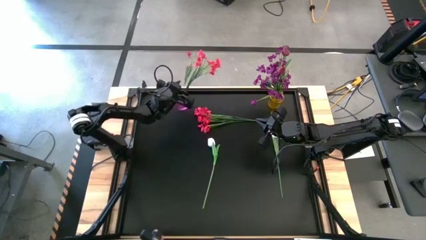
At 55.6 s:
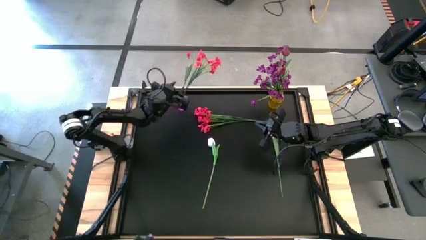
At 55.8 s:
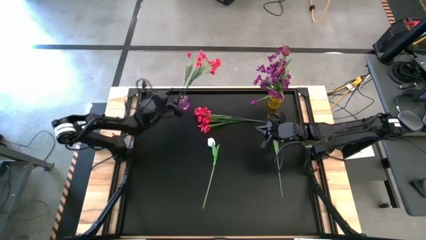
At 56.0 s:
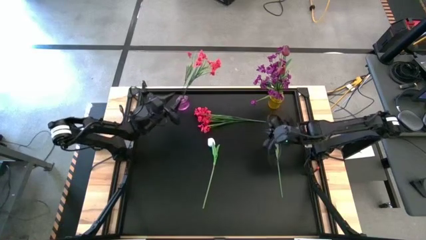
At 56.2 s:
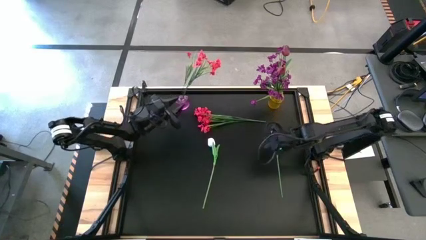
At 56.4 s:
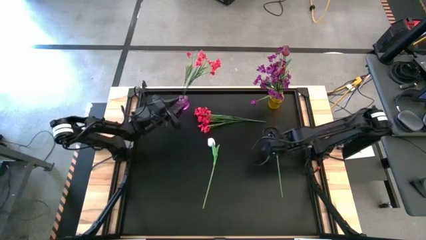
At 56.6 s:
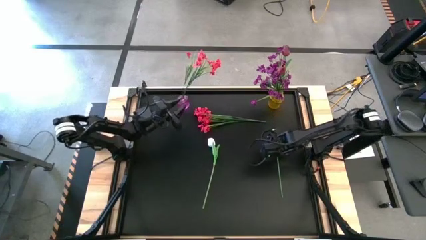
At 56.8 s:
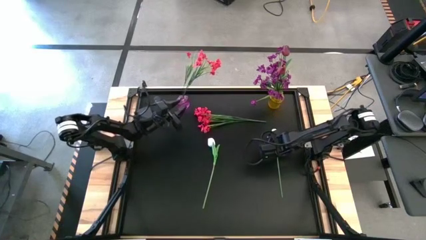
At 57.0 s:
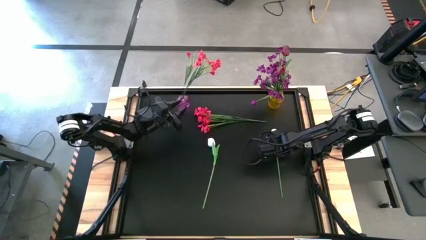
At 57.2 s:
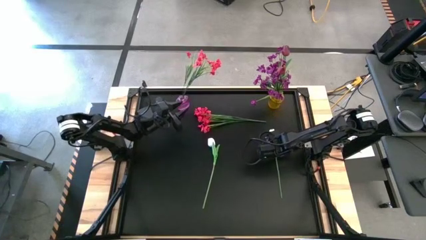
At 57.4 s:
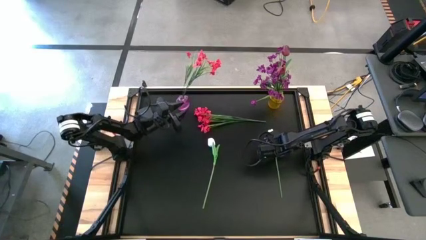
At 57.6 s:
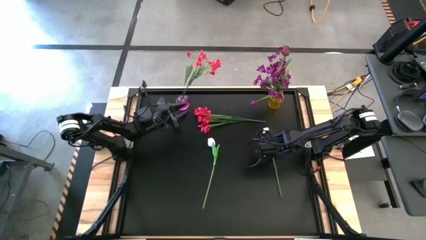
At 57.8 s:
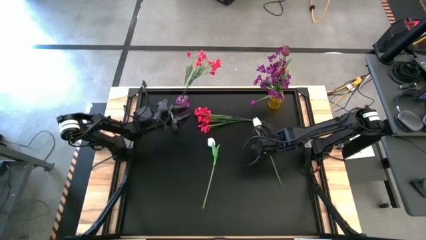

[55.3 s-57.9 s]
Task: Sort flowers into vase by color
Put the right white tulip into the purple vase

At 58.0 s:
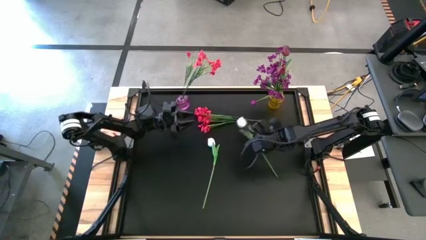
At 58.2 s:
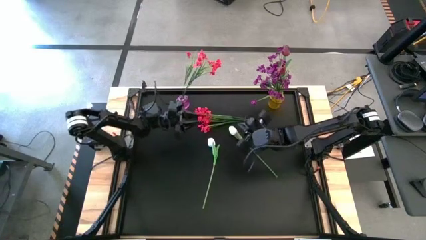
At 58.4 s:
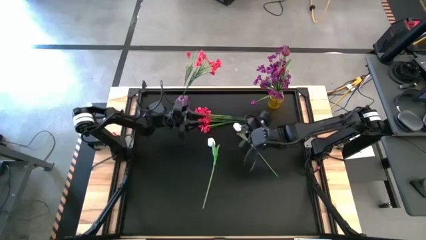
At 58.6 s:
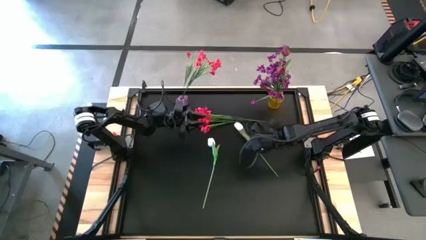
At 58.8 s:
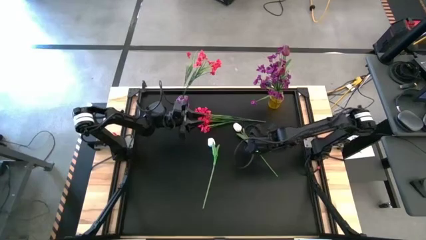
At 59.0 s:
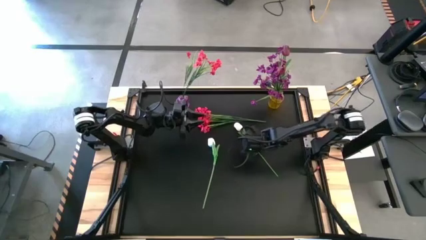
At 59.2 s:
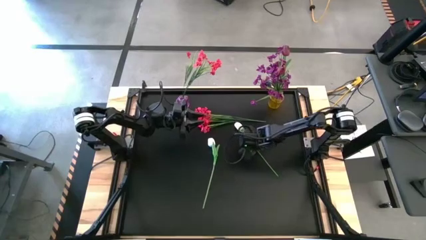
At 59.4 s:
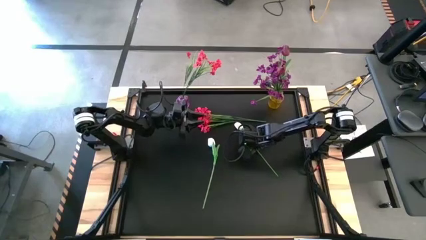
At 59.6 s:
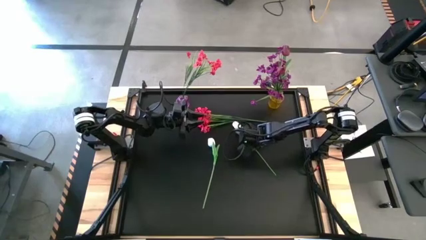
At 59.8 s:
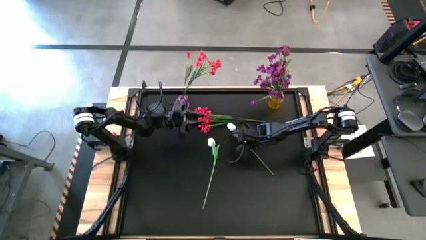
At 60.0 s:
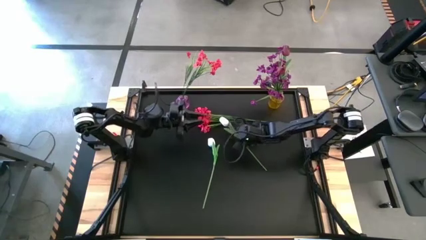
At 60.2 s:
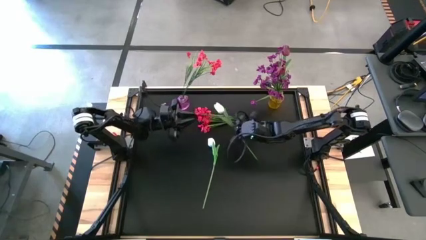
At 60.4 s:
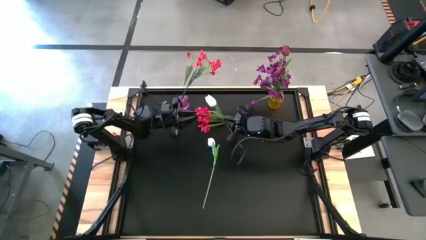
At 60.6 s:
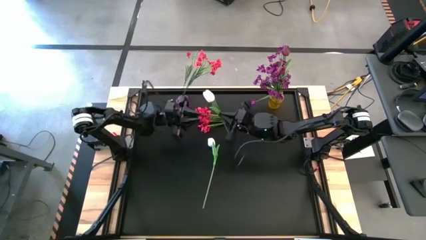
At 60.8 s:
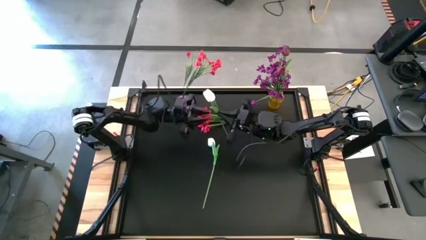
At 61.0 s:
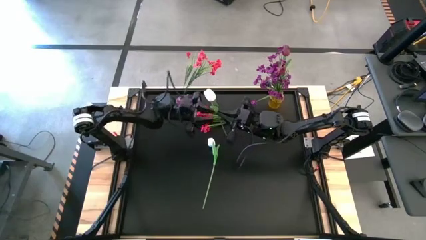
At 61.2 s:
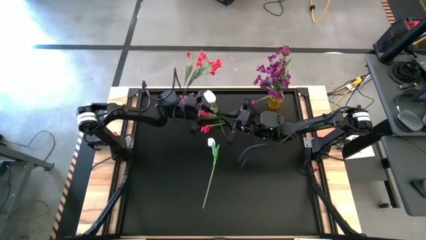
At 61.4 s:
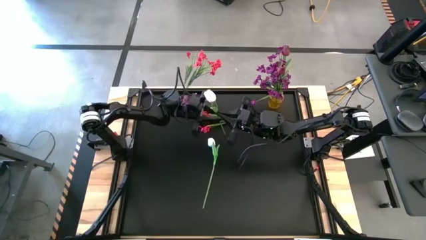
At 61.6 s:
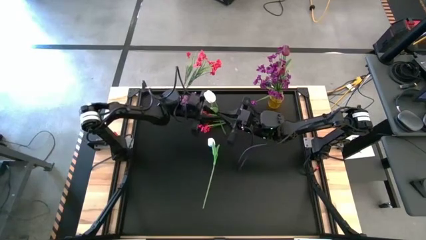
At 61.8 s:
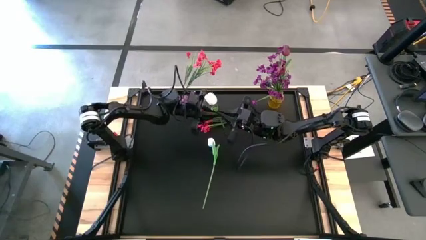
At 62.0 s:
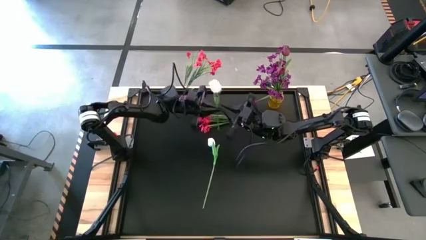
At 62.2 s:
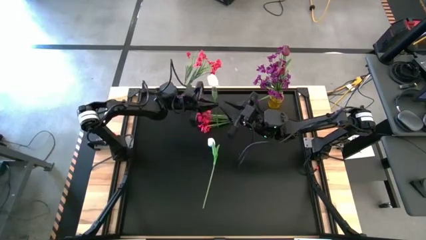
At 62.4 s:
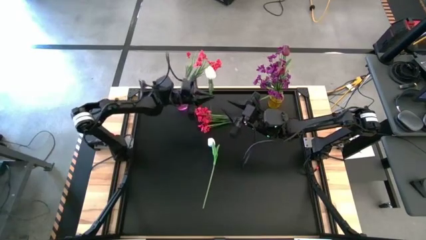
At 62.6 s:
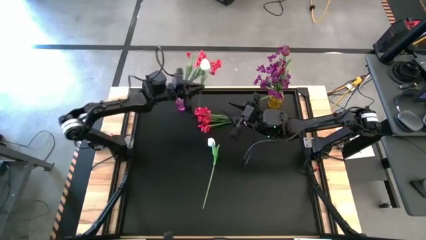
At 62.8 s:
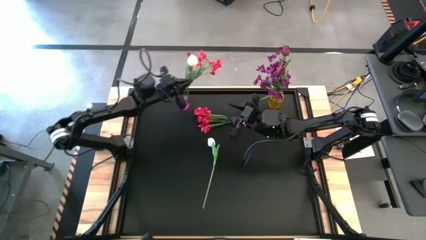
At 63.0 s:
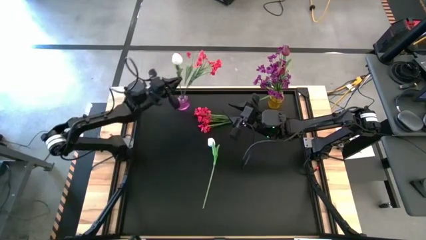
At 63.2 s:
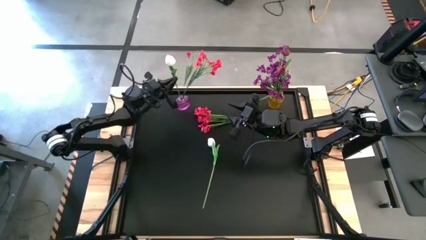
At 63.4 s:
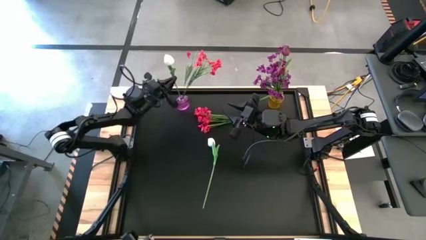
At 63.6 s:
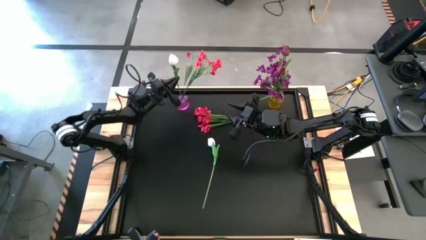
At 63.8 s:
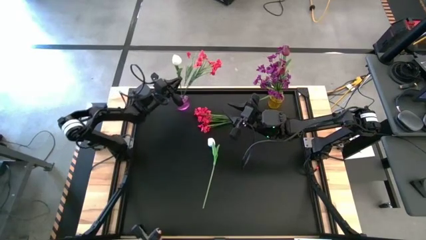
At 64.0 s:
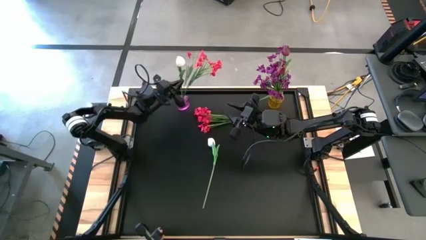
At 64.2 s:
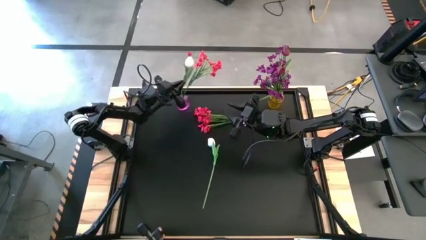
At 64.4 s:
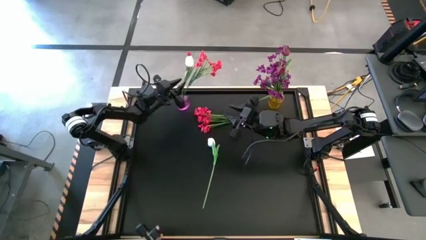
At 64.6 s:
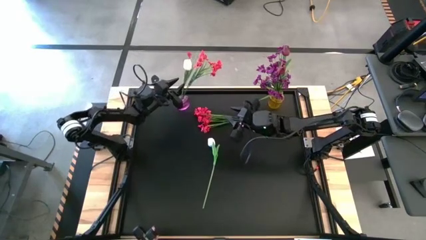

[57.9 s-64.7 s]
Put the right white tulip into the purple vase

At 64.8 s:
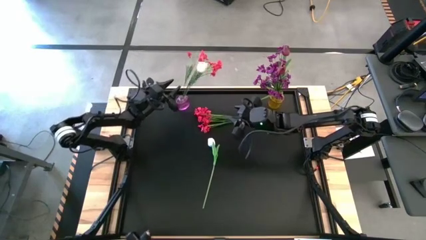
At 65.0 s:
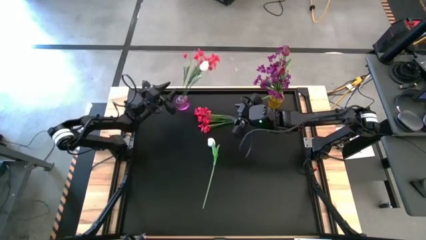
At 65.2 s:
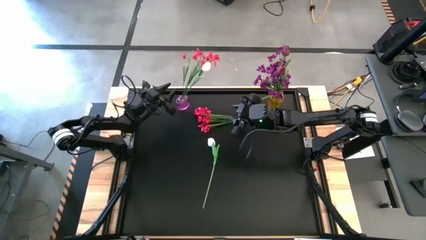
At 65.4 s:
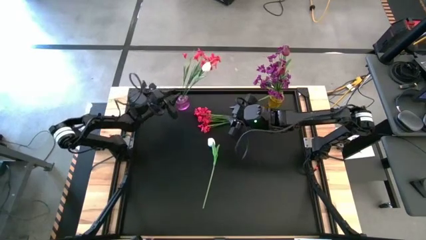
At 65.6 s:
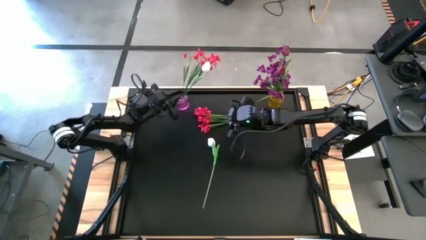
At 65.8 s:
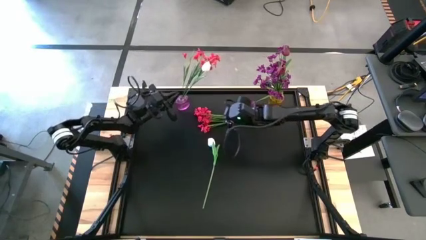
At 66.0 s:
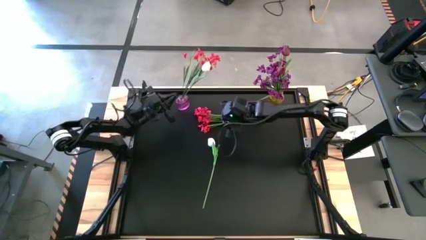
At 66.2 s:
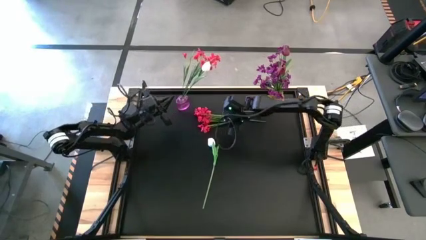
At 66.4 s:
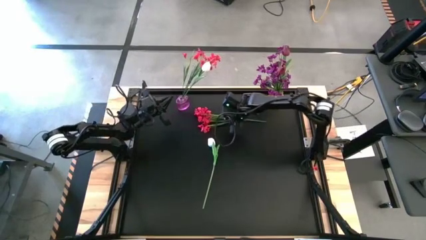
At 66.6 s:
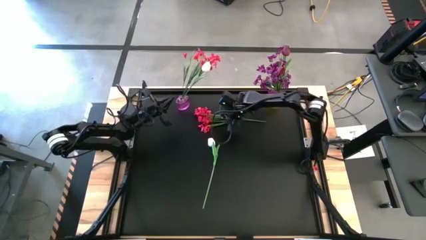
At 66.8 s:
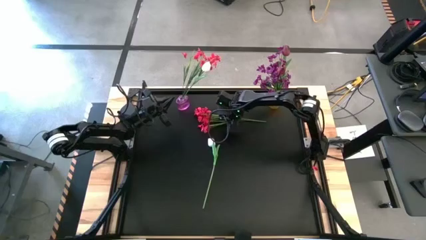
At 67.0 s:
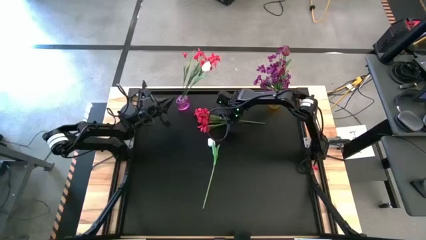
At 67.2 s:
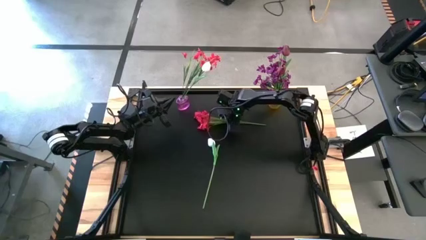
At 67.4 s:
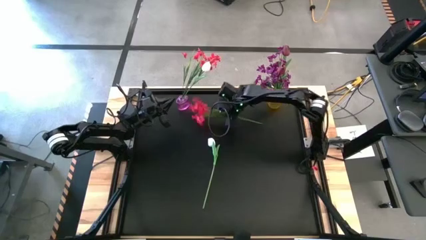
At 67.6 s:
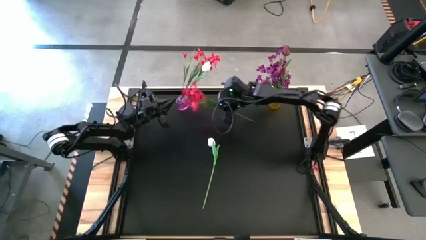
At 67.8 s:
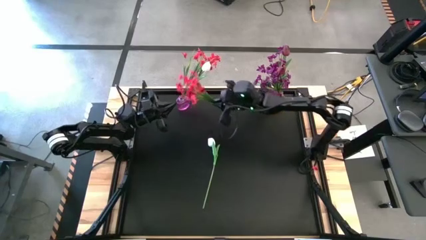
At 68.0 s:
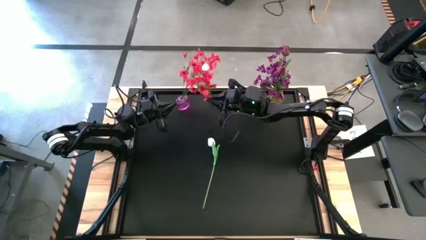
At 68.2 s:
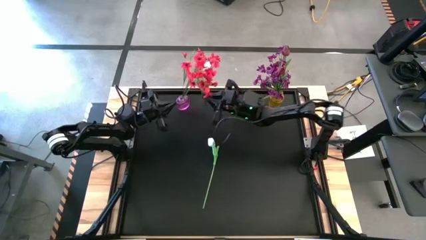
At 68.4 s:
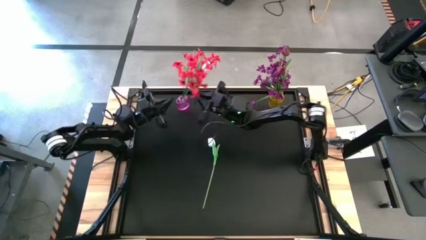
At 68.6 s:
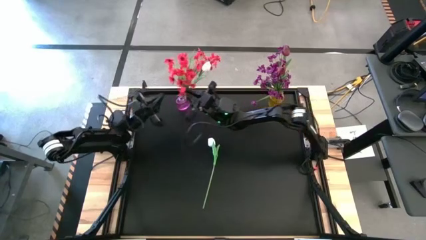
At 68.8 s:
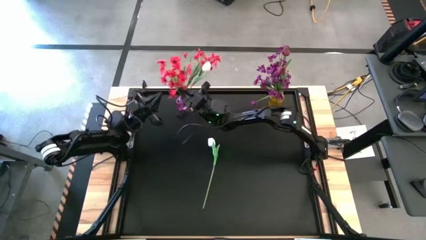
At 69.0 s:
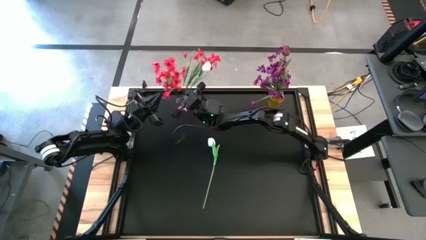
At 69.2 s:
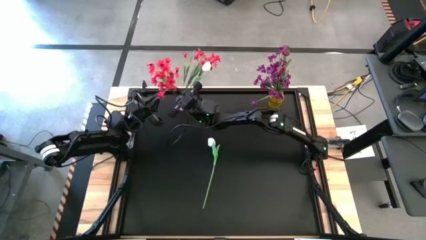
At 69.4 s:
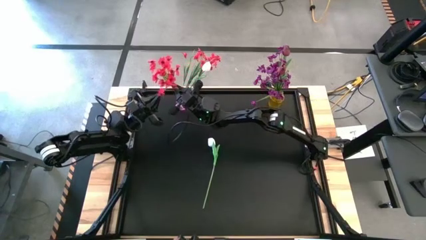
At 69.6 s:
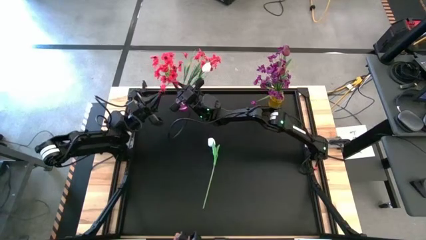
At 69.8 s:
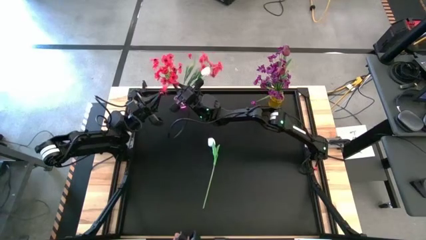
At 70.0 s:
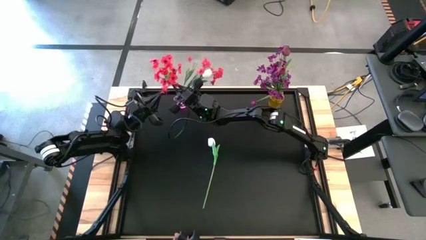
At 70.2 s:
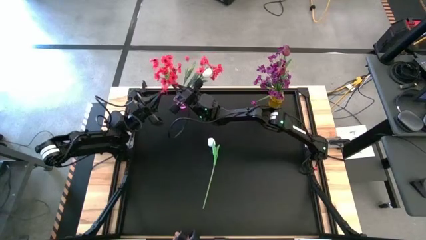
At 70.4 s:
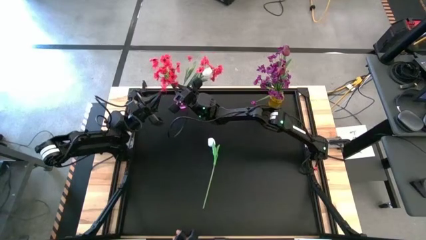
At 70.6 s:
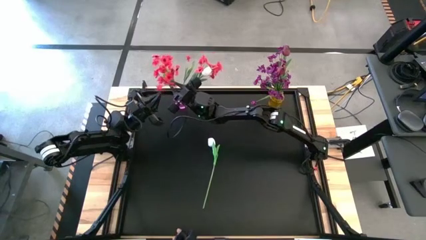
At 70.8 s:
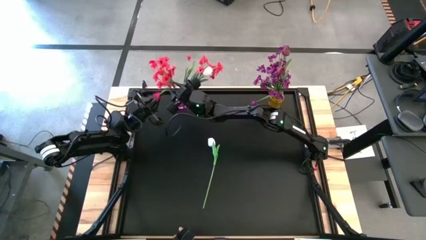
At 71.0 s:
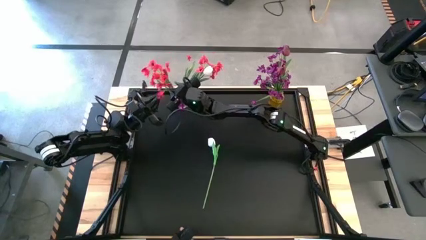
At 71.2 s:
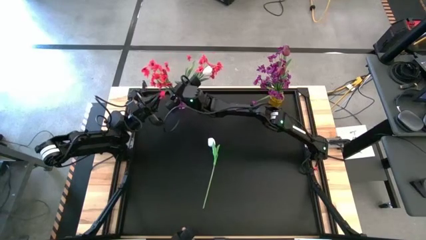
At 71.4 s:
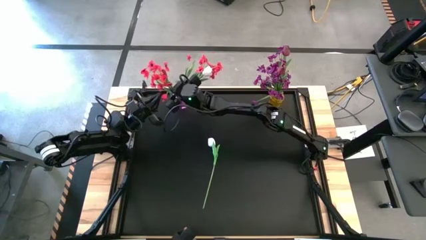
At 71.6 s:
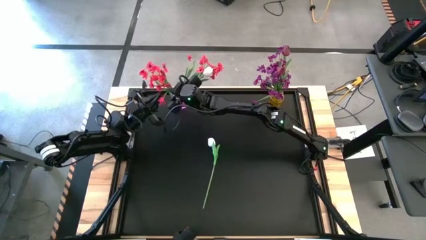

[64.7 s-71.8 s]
Put the red flowers into the purple vase
